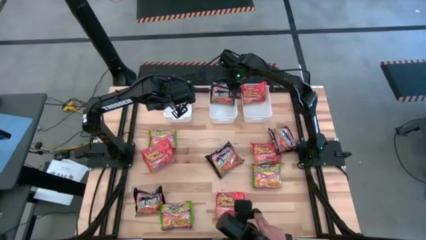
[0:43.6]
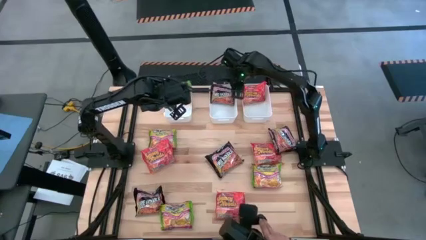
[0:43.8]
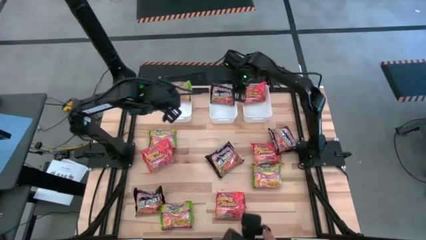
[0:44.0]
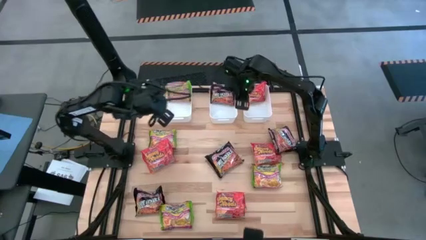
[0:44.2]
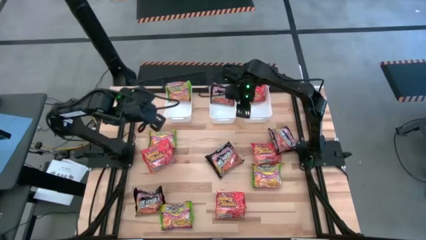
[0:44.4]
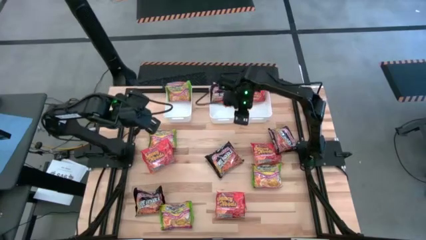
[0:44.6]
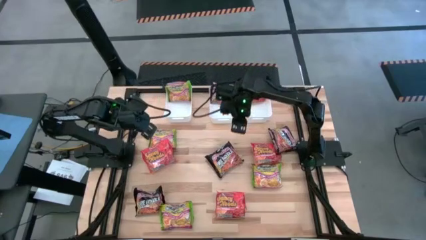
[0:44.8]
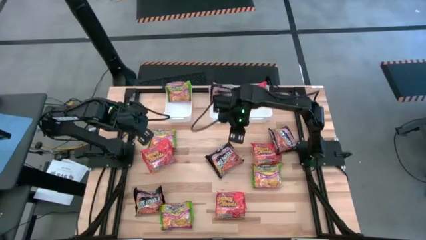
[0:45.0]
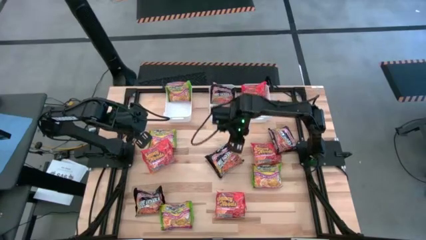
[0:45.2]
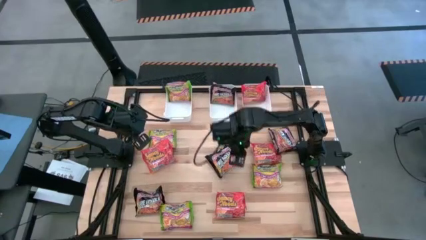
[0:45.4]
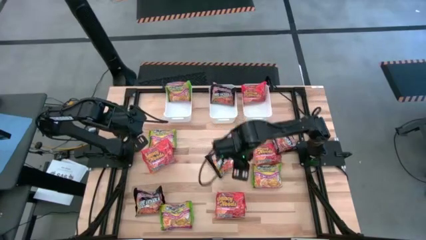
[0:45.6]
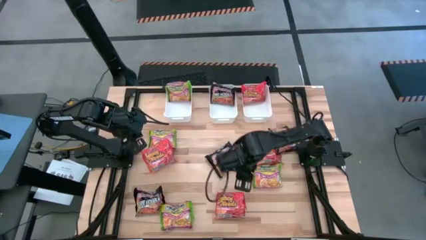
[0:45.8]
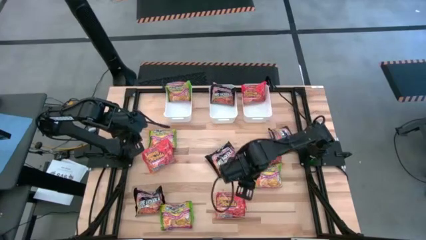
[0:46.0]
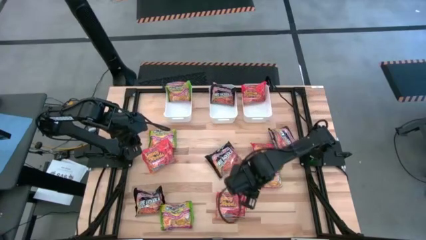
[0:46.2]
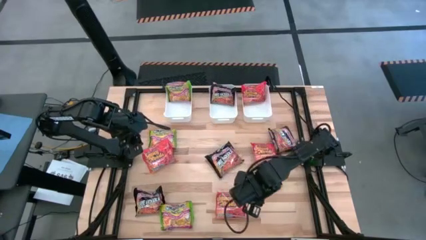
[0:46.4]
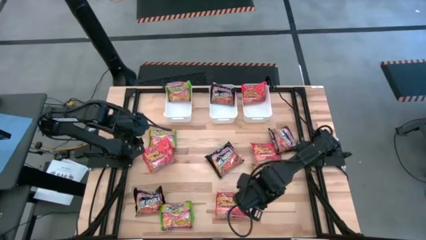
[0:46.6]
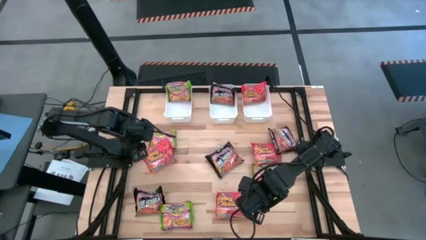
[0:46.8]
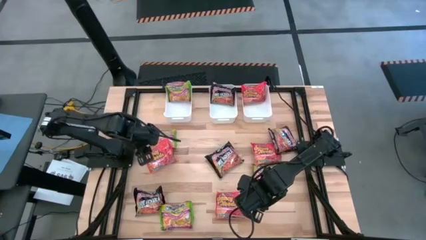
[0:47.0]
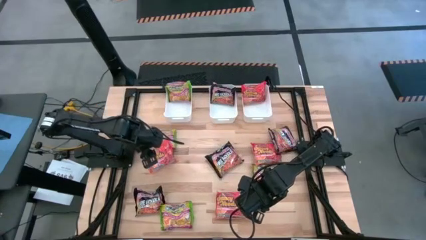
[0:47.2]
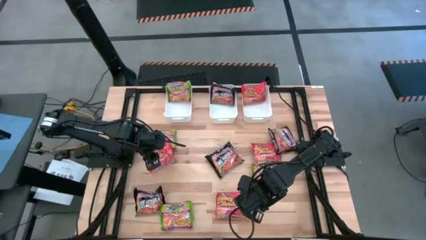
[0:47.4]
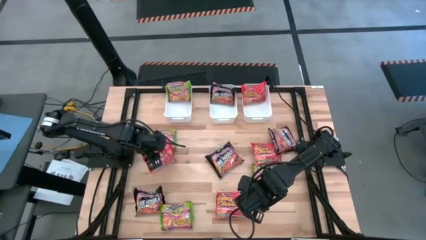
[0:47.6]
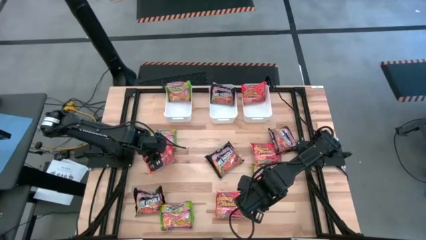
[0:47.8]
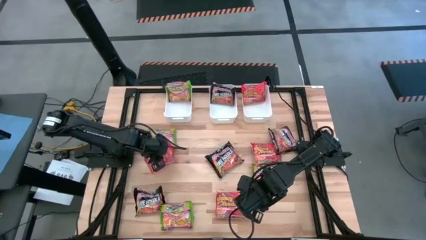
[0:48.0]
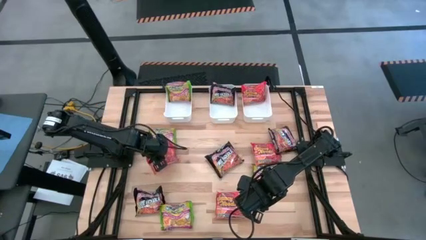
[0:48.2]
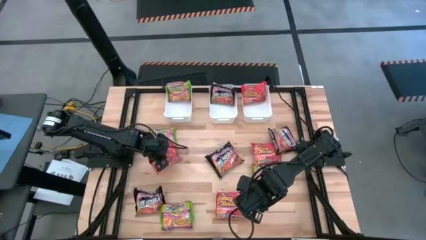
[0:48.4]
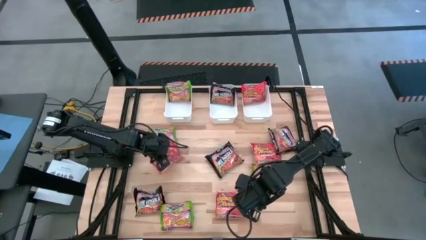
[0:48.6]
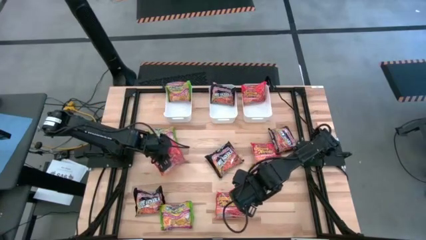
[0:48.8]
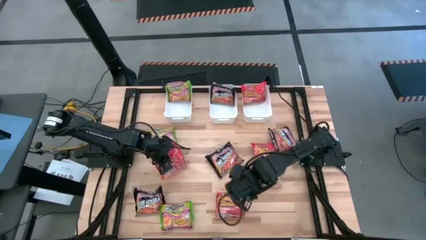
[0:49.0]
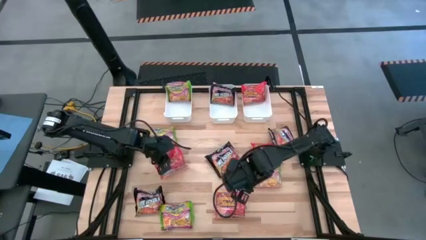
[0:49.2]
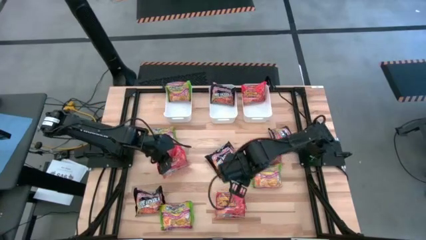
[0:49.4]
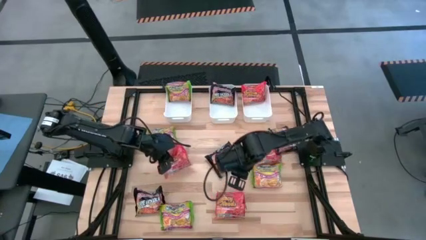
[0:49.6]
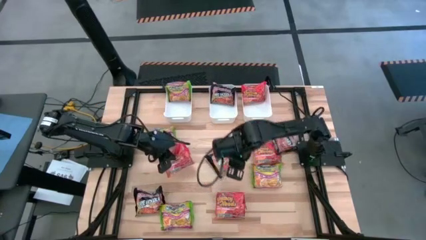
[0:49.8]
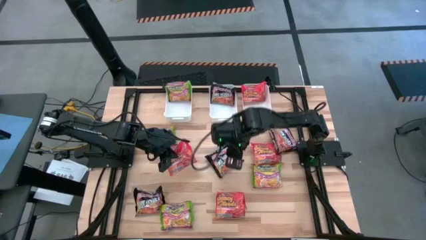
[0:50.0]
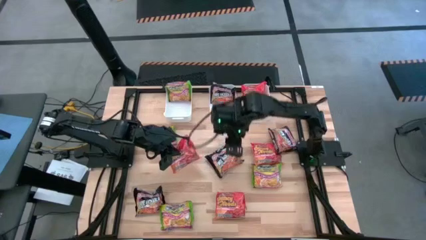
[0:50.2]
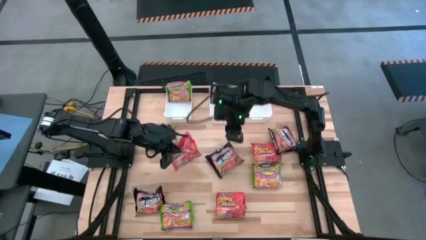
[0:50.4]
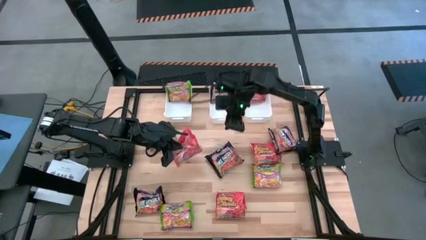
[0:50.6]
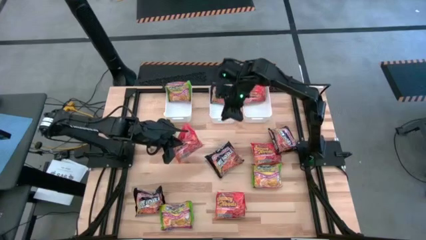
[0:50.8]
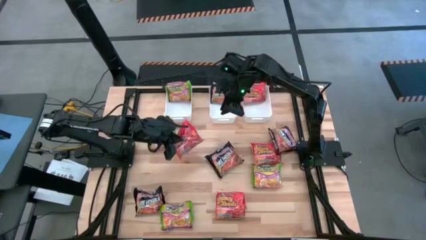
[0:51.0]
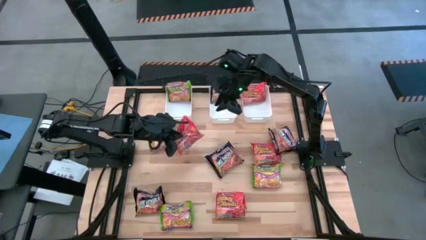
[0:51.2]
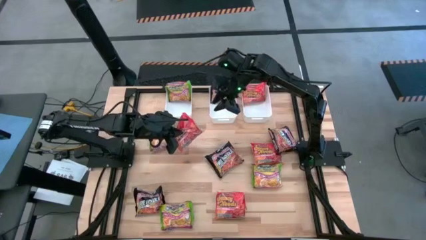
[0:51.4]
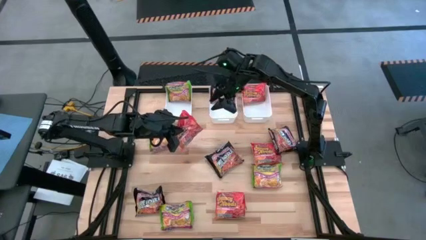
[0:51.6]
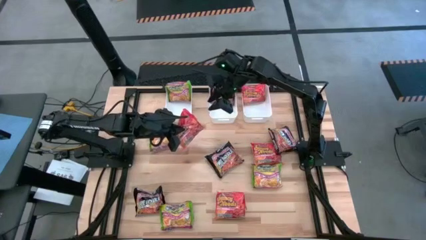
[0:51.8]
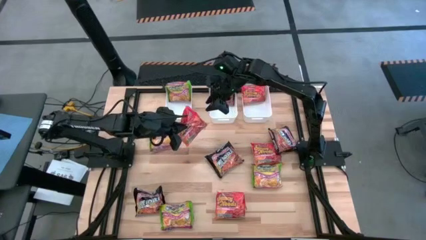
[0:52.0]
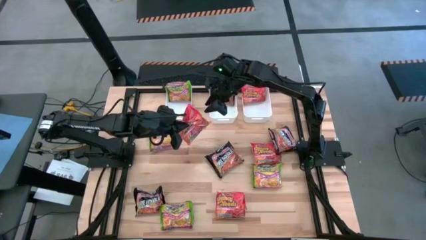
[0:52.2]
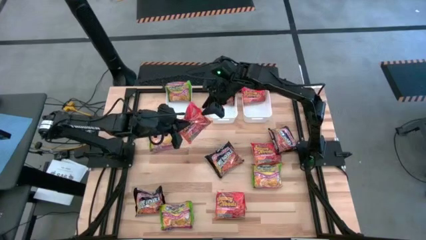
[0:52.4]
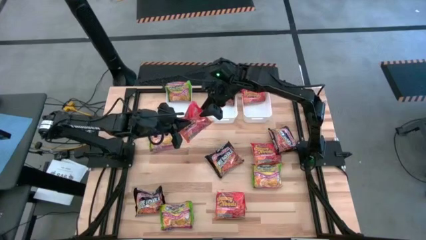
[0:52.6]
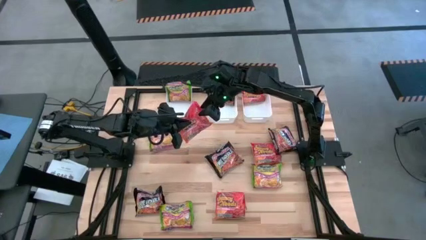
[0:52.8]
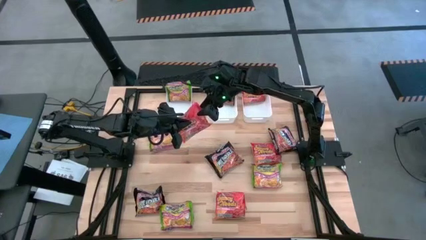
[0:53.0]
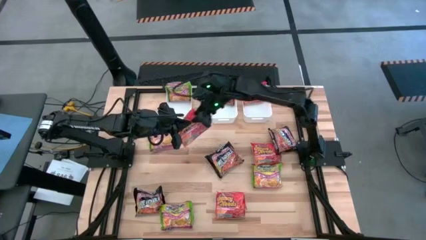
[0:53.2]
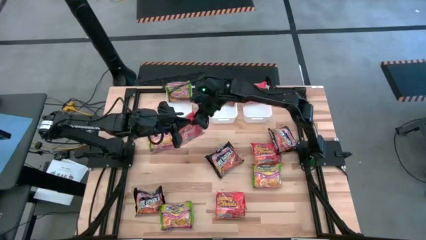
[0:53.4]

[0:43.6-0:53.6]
Task: Sort Maruchan noodles
Put the orange noodle pack into the right white bin

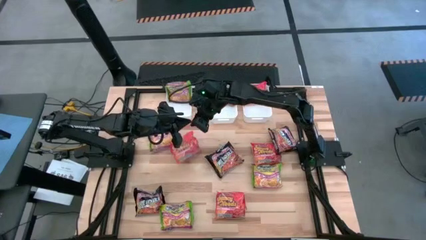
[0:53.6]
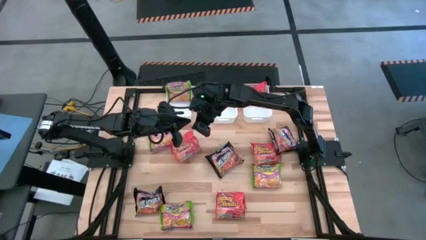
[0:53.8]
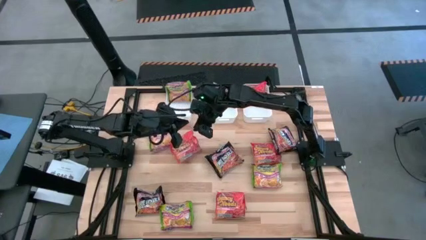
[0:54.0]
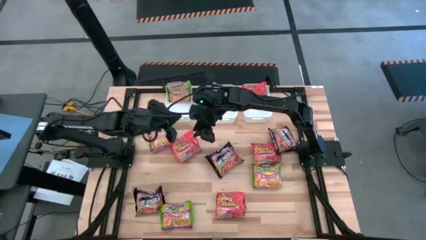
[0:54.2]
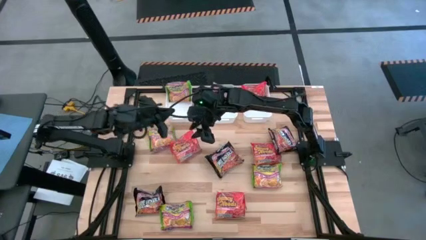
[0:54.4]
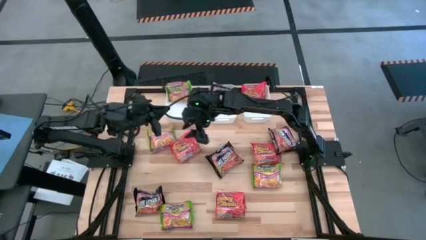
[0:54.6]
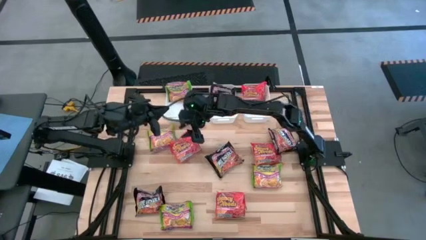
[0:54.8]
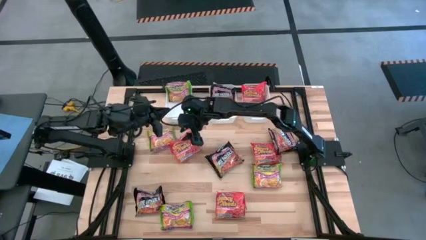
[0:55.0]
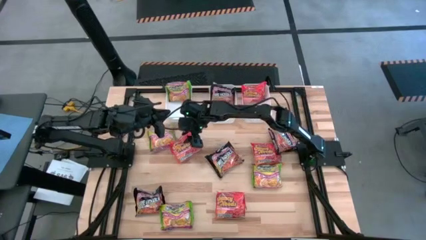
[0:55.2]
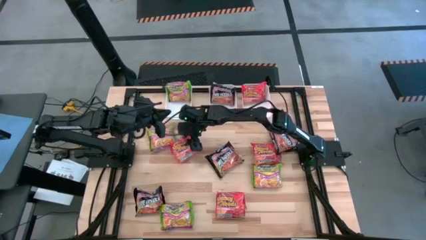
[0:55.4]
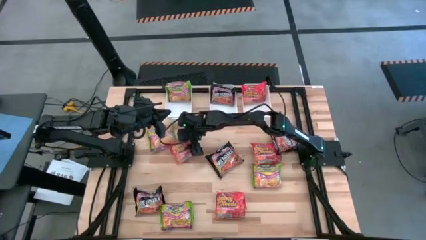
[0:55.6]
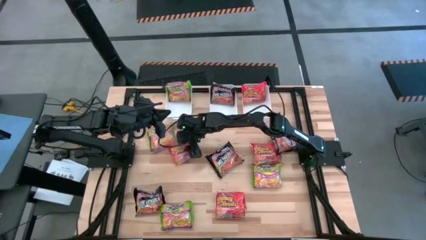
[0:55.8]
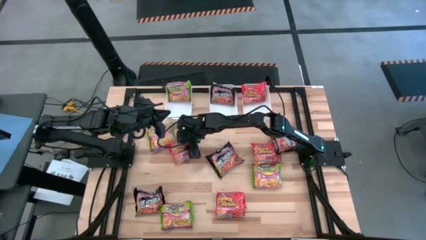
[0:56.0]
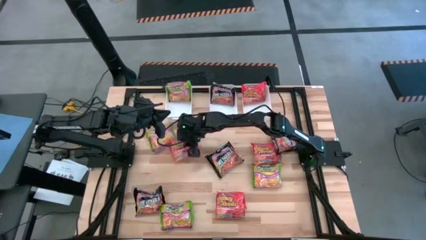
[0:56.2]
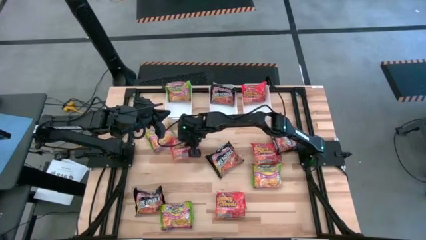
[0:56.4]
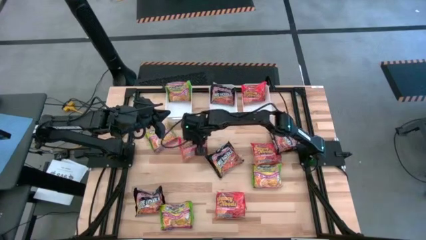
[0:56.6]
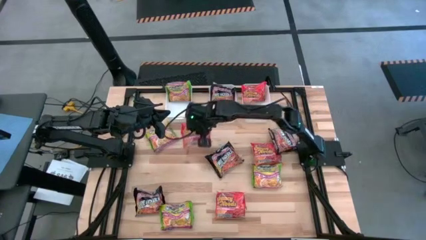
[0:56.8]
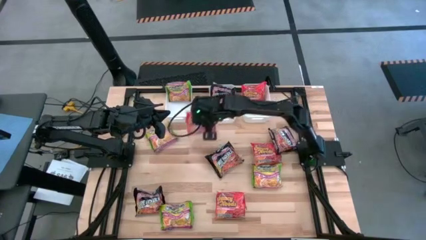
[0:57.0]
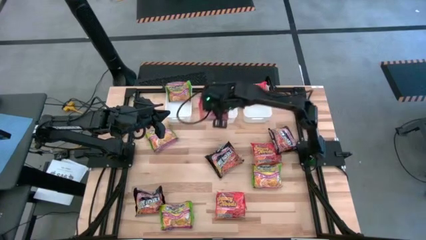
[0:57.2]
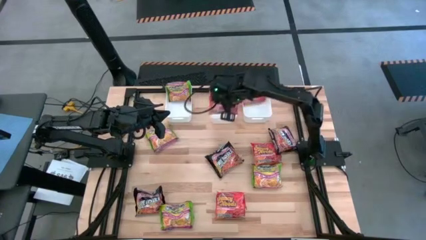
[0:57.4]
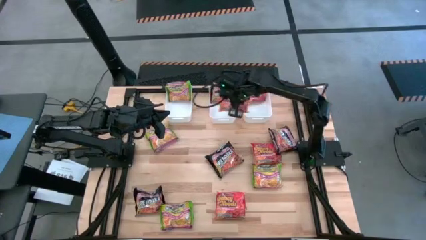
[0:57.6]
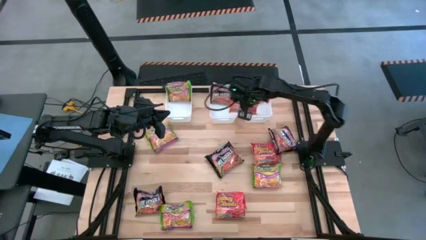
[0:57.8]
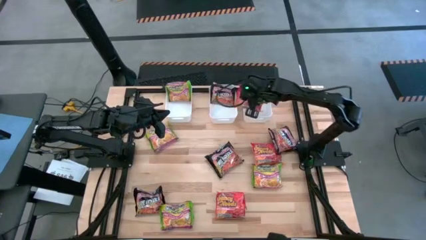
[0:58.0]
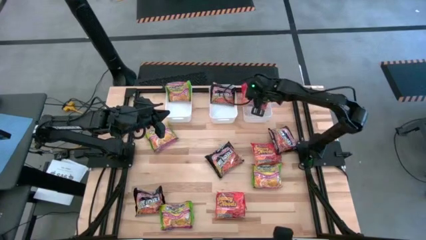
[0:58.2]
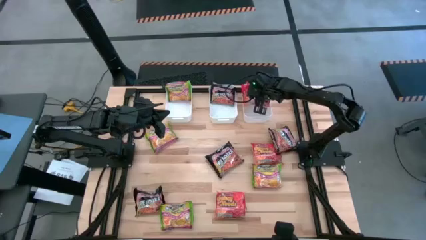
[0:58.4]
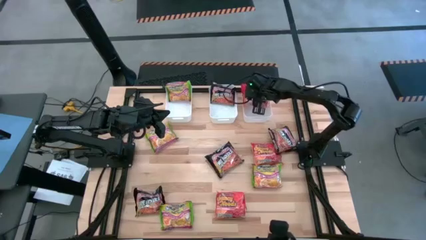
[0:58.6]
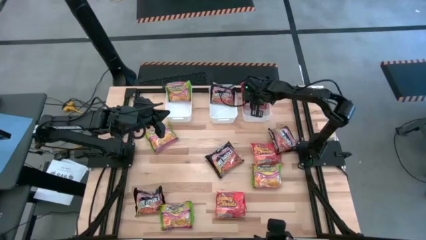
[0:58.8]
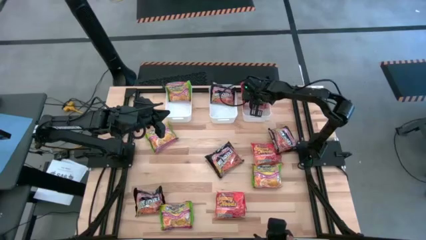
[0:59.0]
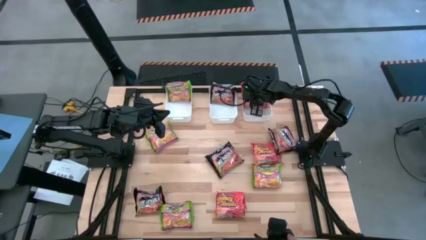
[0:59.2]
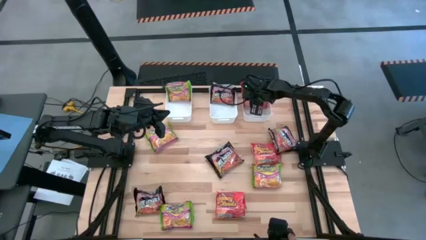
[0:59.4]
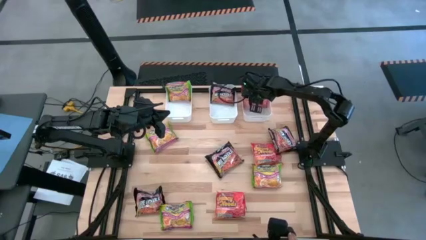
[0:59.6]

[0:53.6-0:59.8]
Put the orange noodle pack into the right white bin
